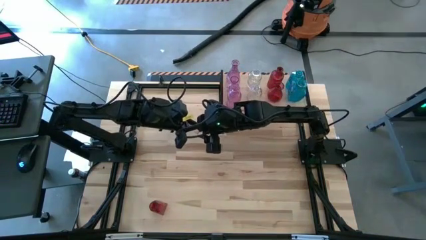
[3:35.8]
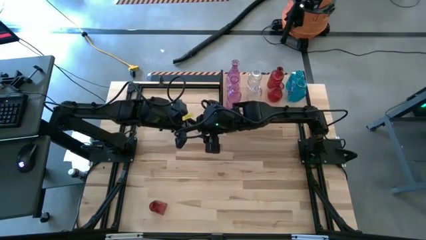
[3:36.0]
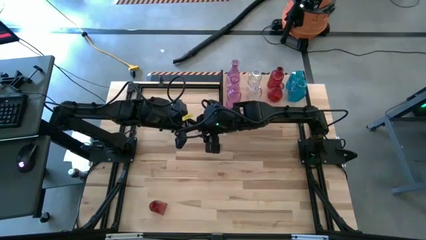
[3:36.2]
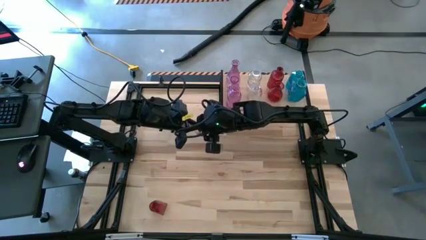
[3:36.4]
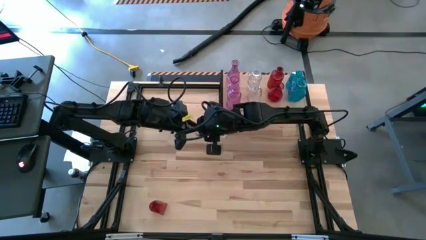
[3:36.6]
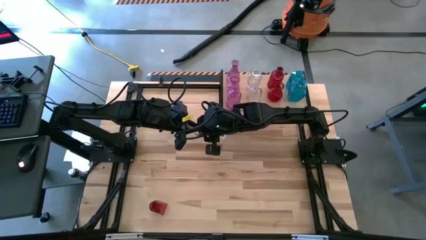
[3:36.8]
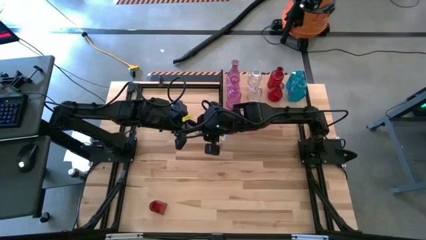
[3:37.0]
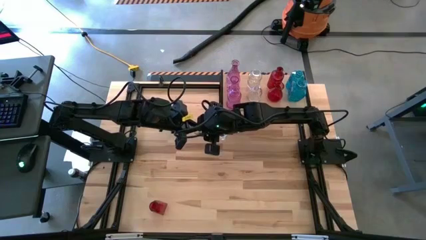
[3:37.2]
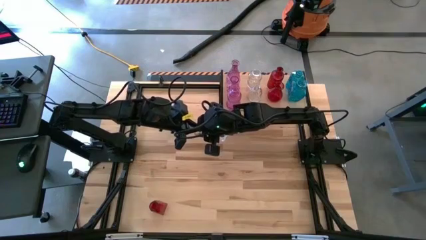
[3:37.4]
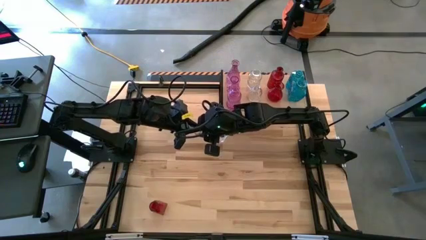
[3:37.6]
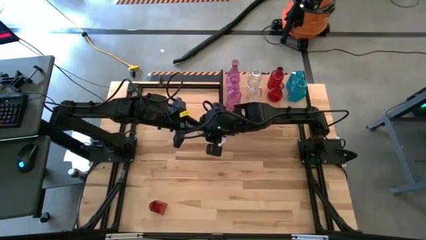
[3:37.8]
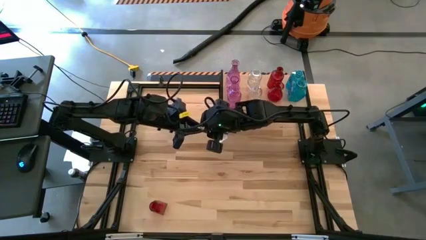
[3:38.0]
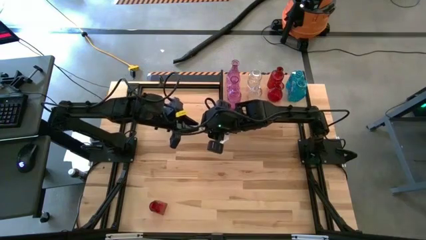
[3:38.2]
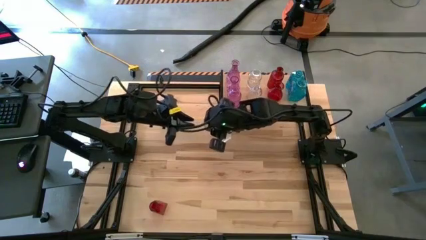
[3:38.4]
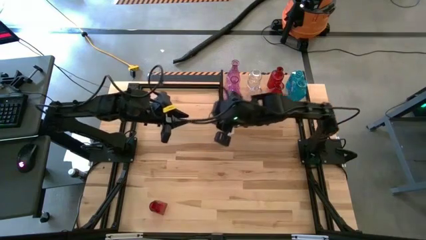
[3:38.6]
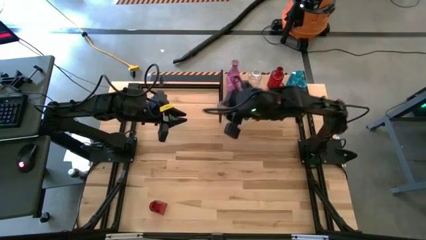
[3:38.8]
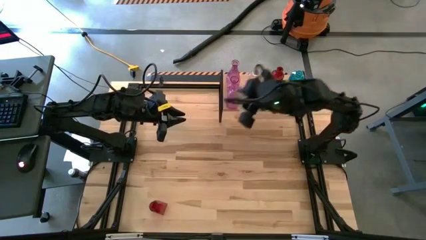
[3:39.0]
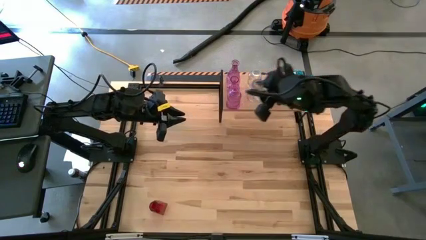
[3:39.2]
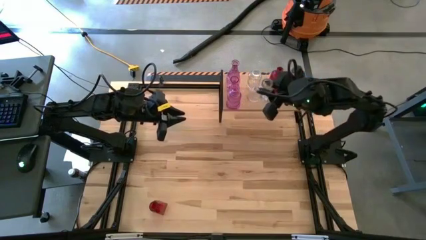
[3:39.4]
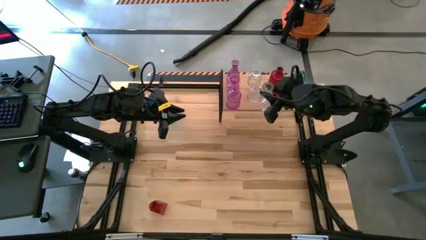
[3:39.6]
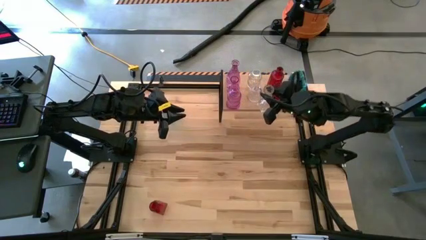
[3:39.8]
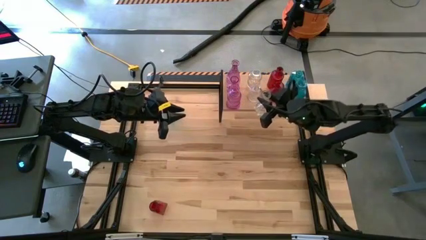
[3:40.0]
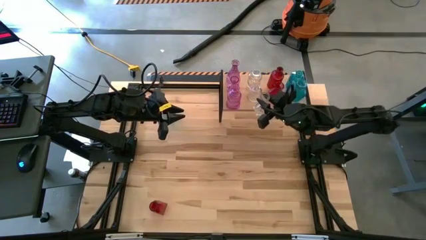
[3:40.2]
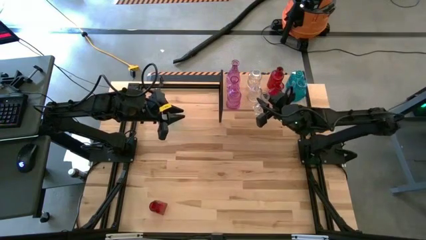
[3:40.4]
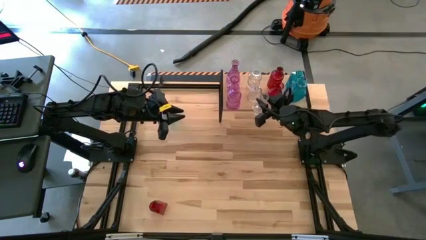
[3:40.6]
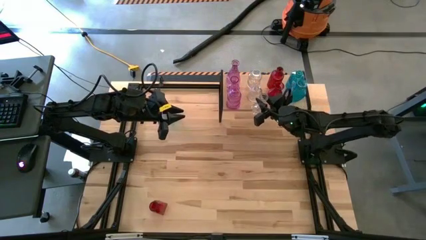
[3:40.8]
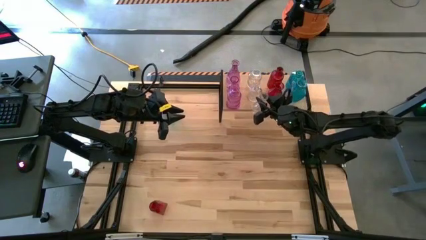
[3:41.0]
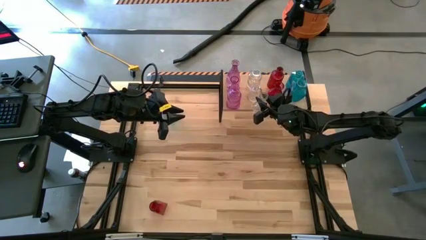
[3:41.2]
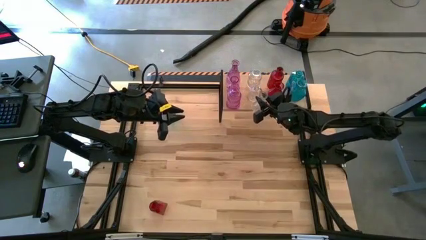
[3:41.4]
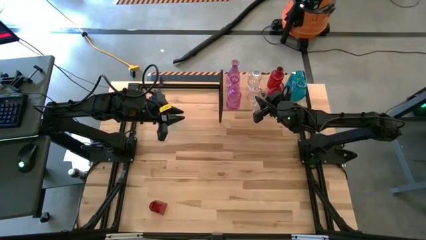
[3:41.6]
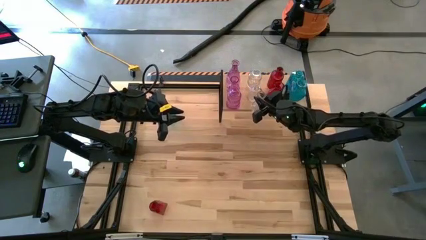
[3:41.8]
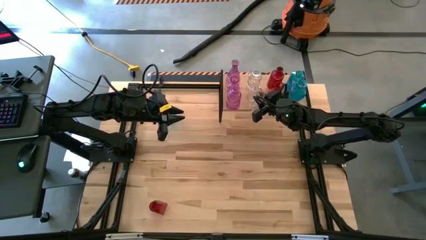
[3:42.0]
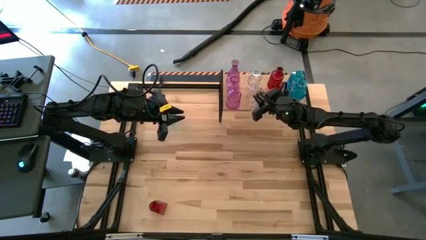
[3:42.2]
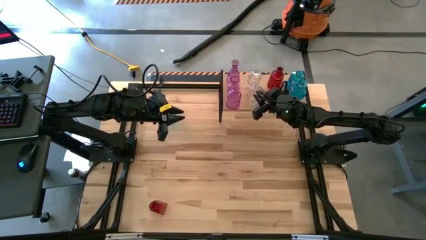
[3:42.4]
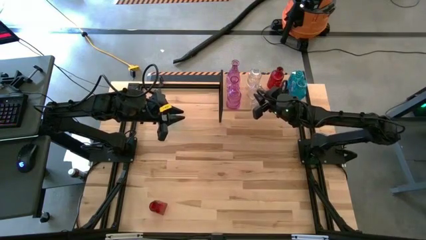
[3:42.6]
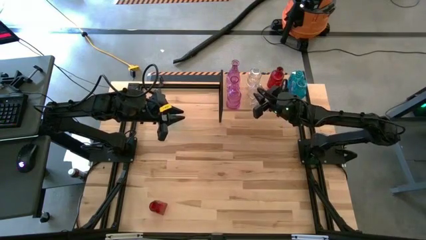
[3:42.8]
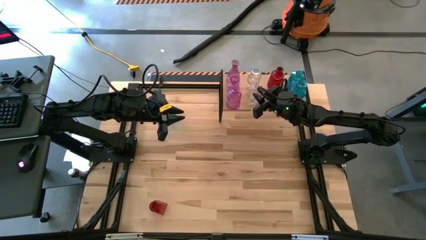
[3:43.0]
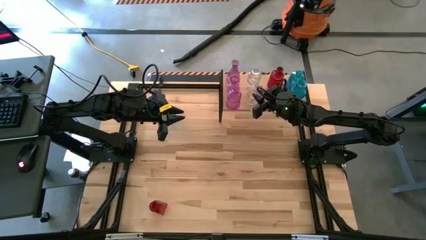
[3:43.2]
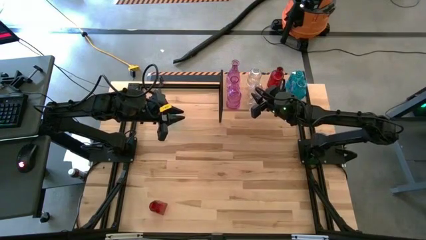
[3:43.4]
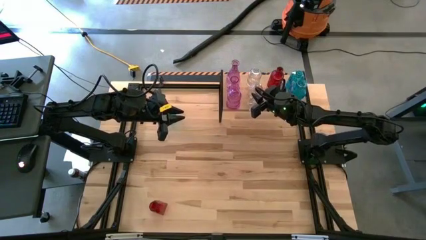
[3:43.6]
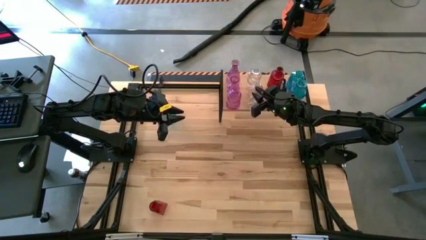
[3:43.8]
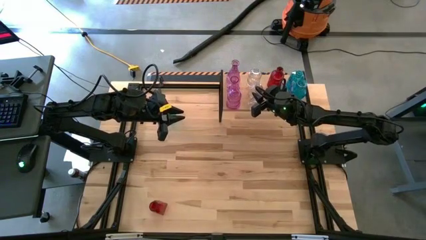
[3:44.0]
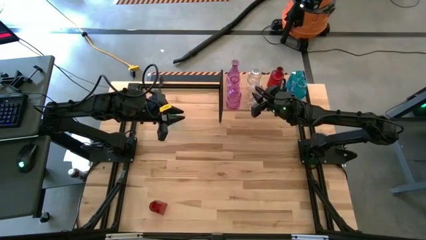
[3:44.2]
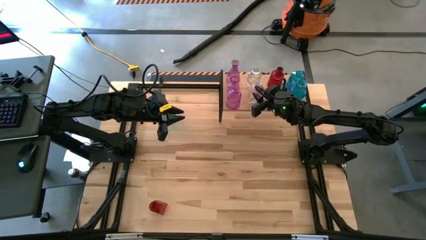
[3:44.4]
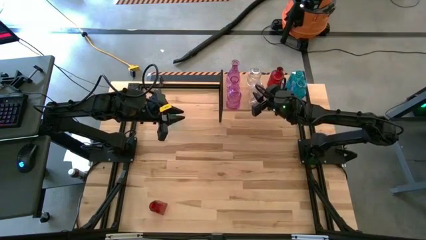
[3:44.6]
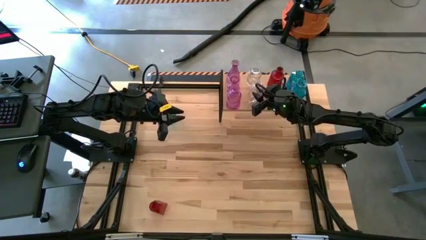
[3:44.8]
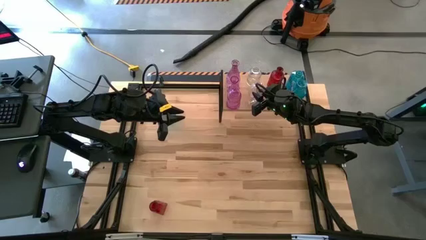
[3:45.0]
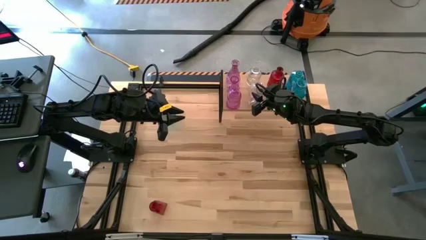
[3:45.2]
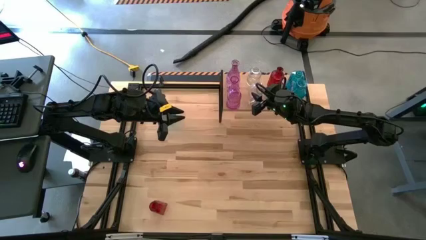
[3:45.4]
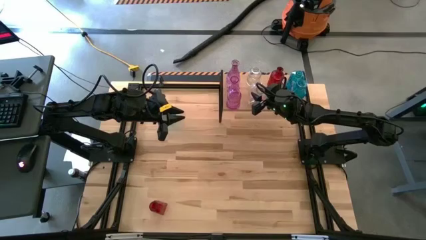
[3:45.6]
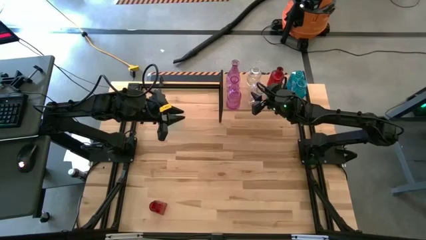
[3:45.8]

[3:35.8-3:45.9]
Task: sort vases onto shelf
Put the transparent vase on the shelf aligned with the other transparent vase

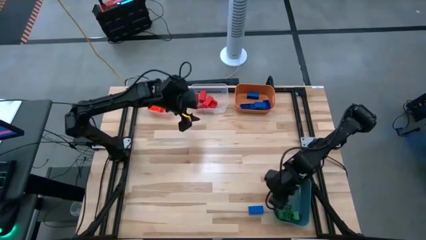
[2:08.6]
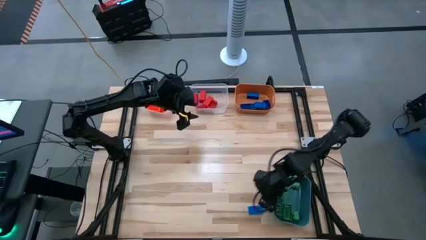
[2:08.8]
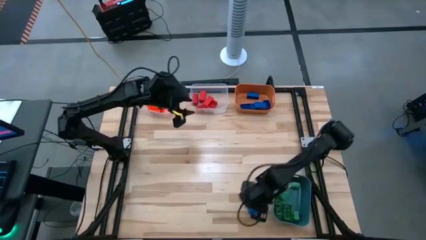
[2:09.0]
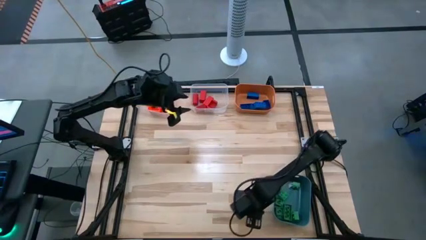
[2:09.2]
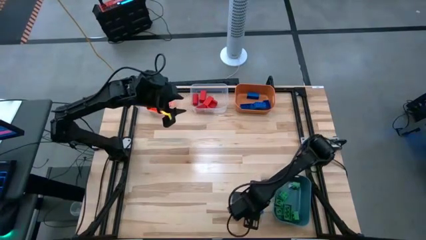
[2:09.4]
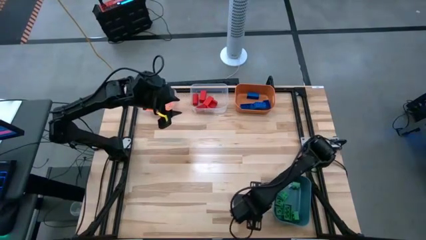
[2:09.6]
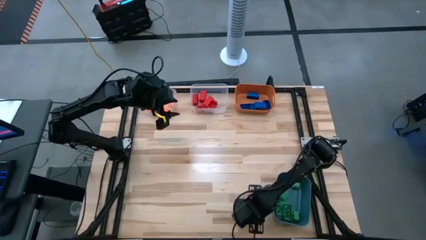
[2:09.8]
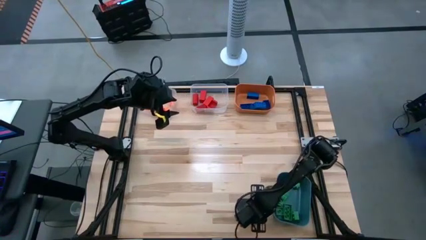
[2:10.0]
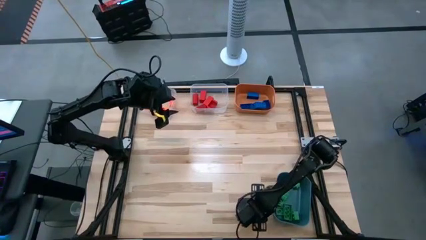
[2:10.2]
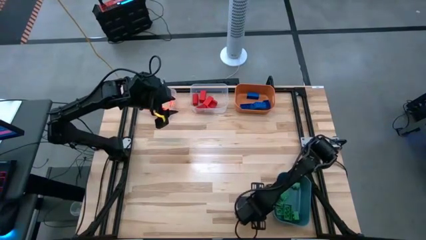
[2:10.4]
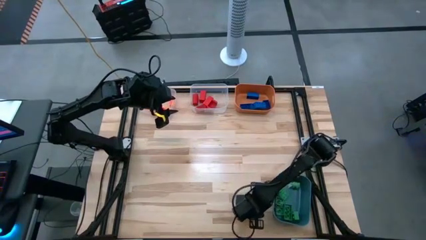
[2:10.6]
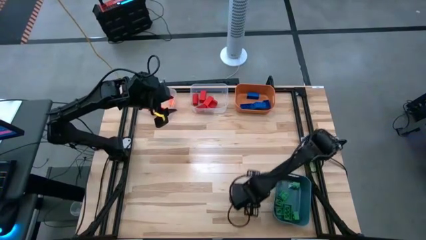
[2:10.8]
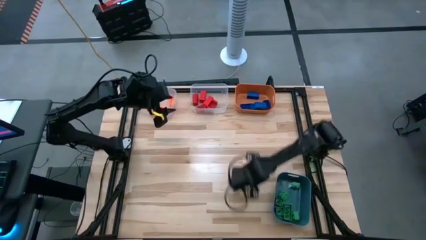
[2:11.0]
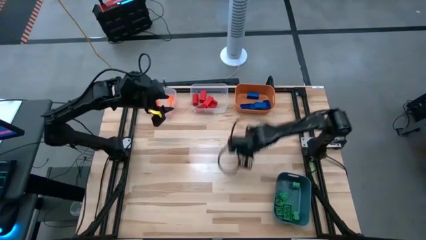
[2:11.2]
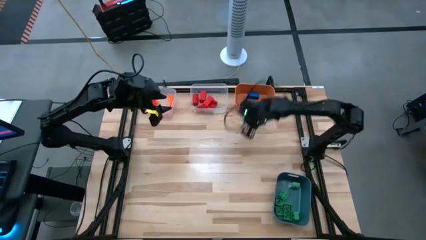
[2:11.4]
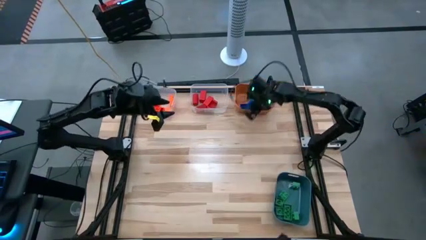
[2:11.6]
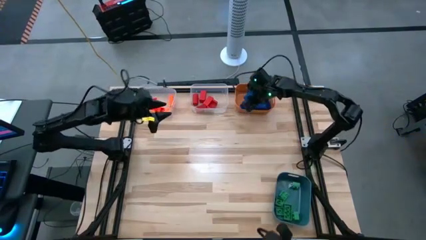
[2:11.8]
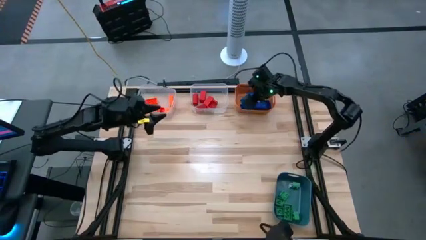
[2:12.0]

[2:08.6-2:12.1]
Task: Sort blocks
Put the blue game piece into the orange bin
